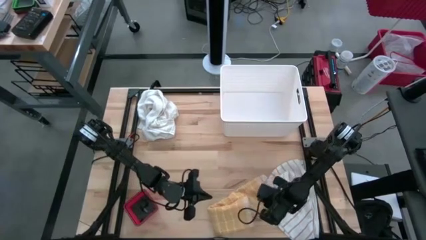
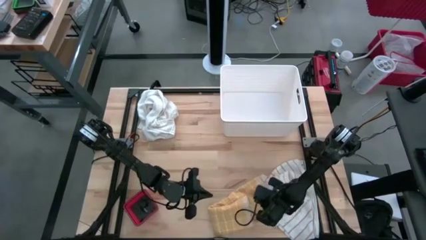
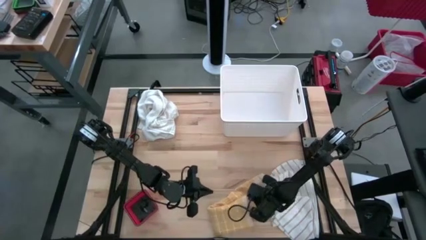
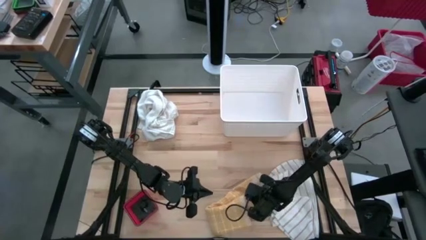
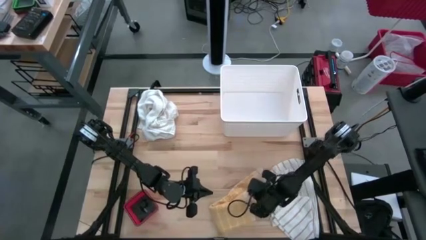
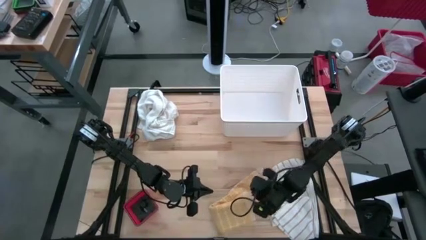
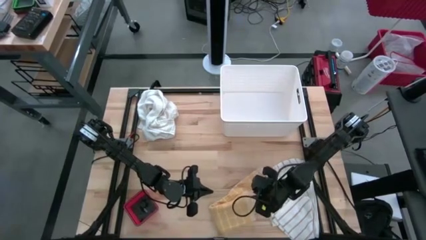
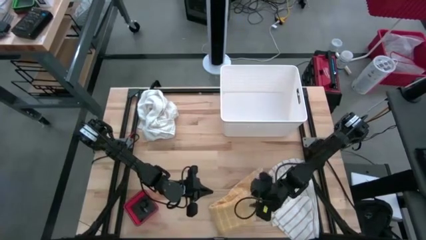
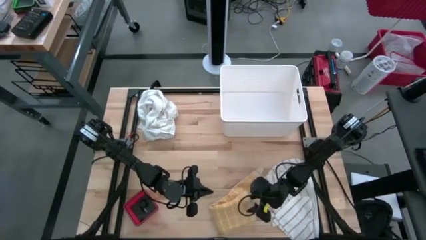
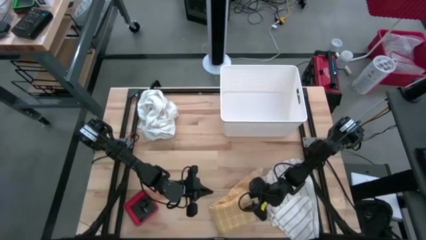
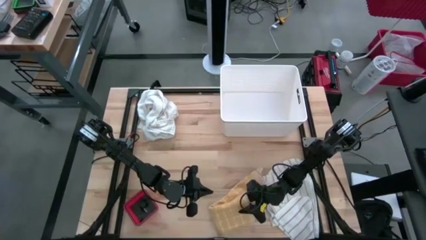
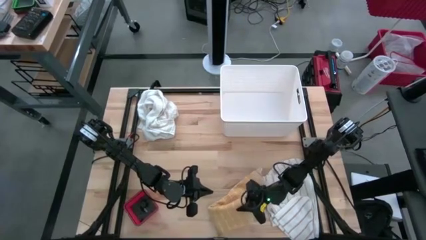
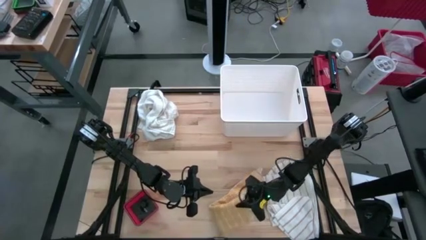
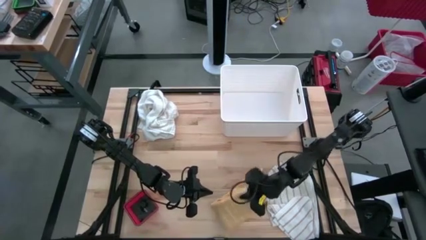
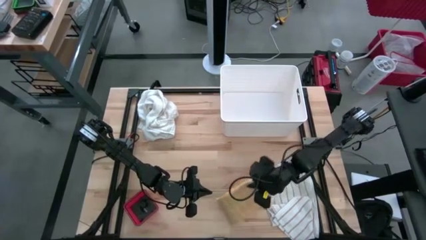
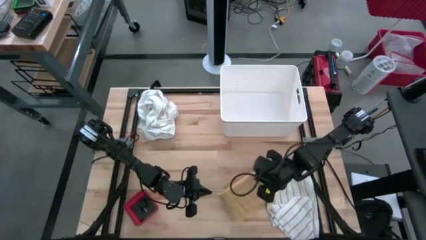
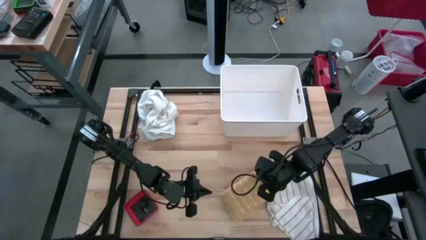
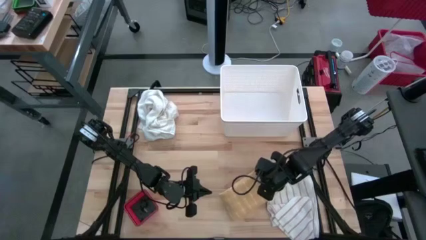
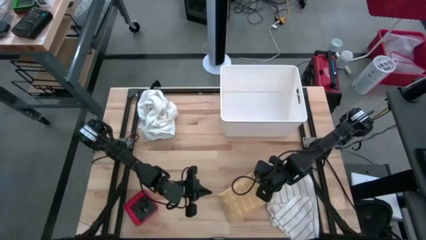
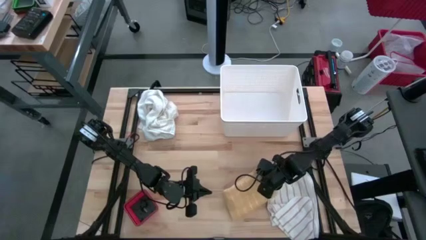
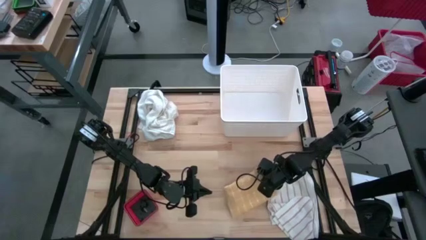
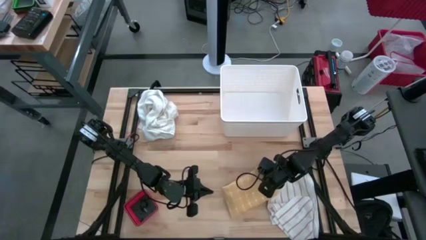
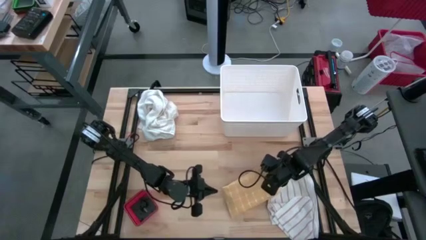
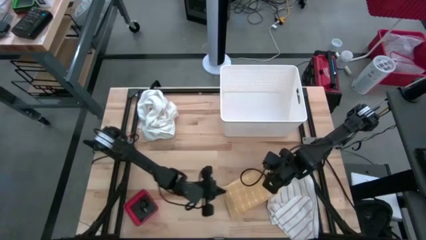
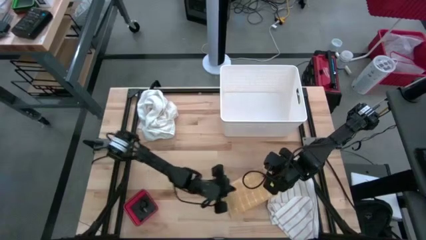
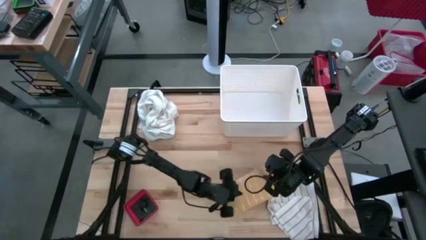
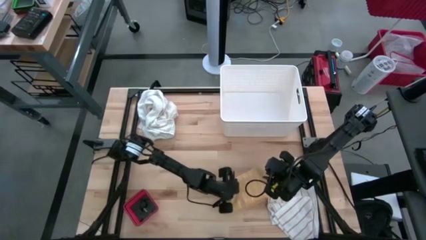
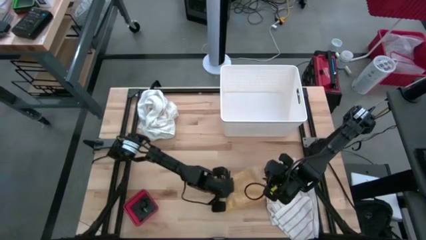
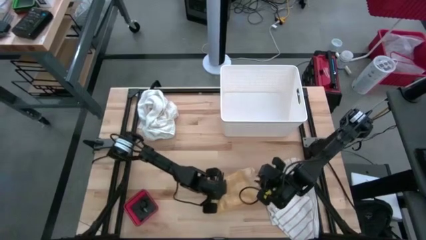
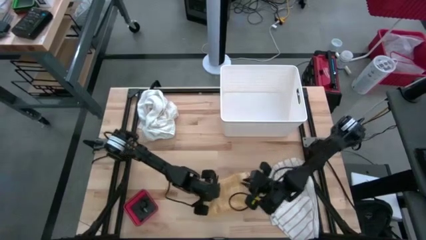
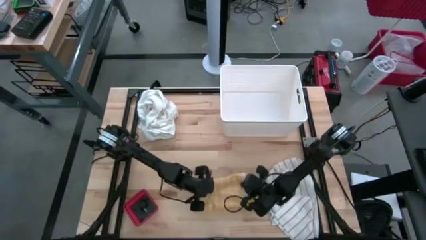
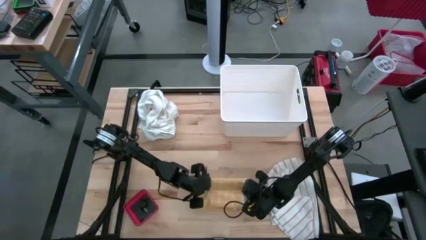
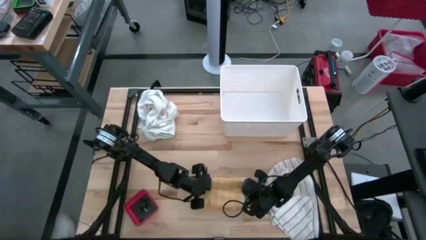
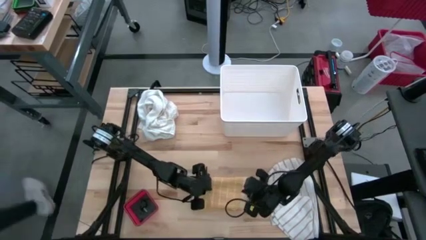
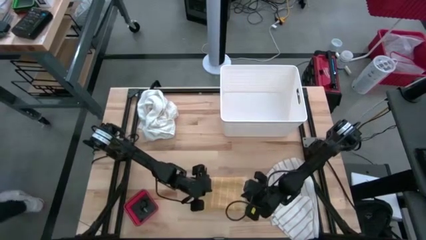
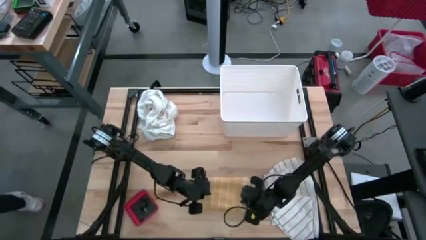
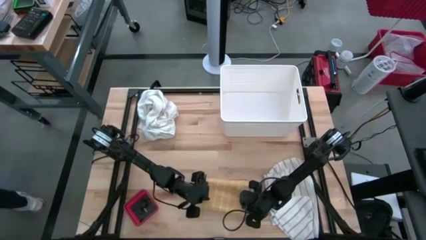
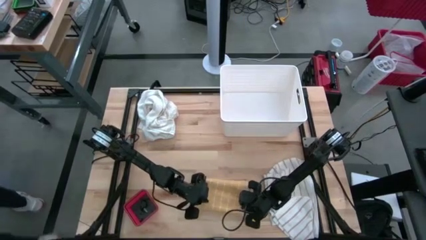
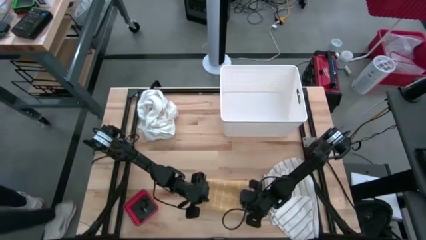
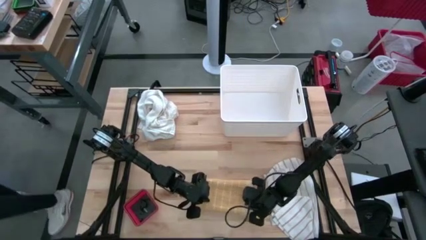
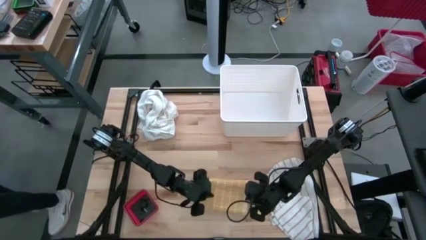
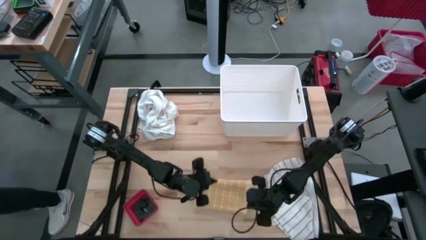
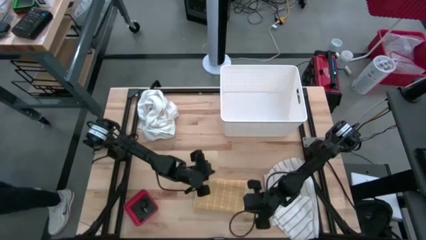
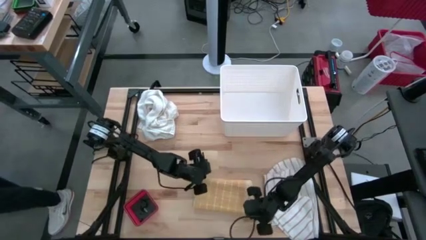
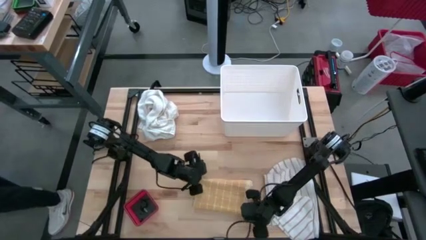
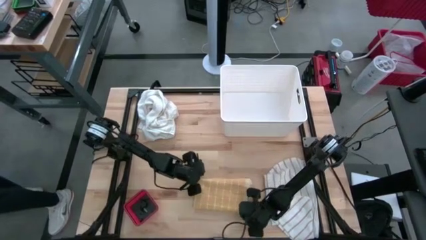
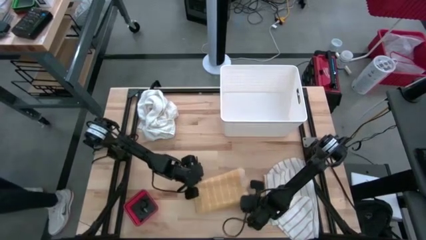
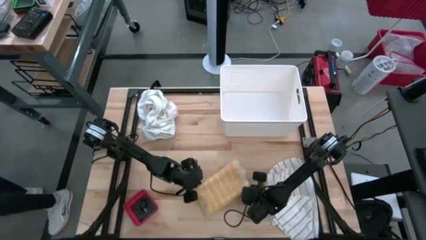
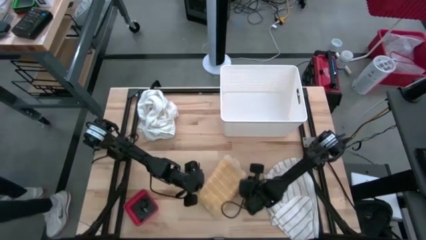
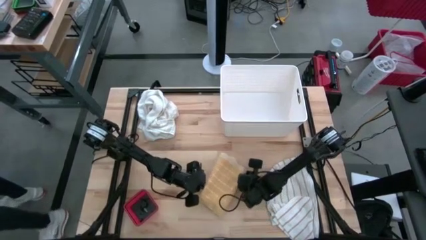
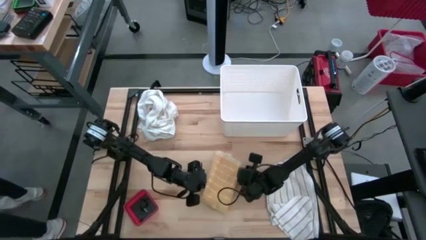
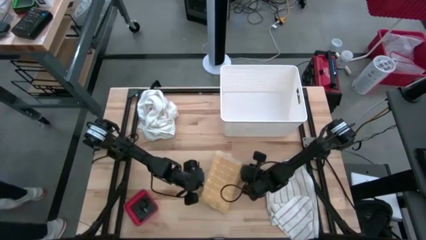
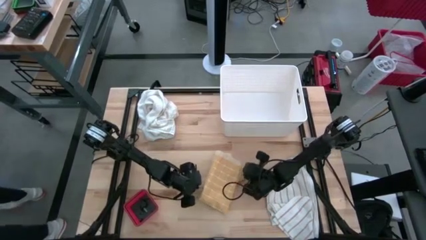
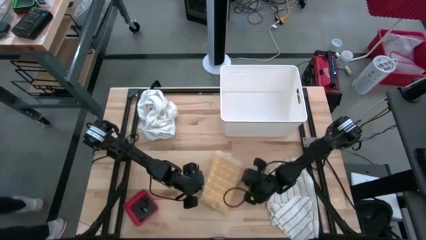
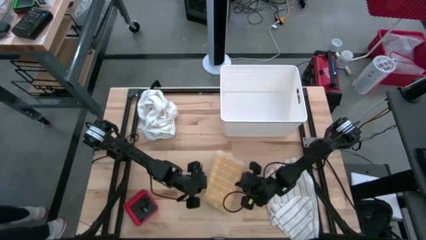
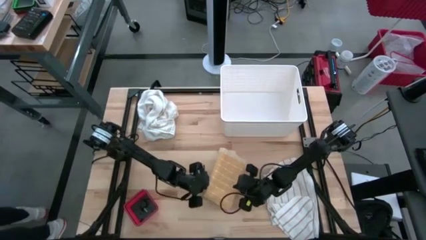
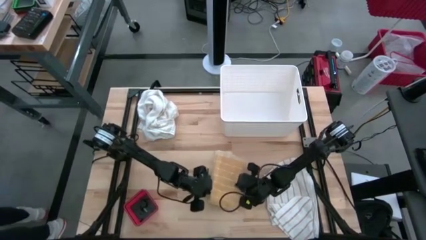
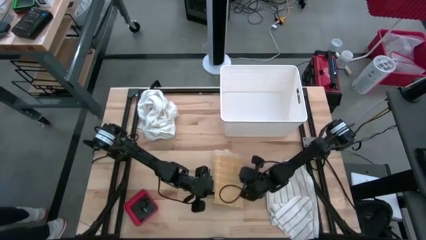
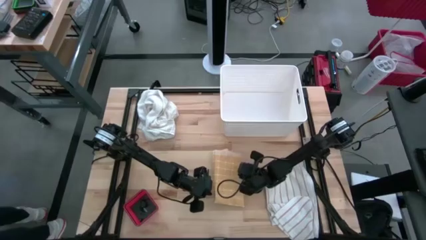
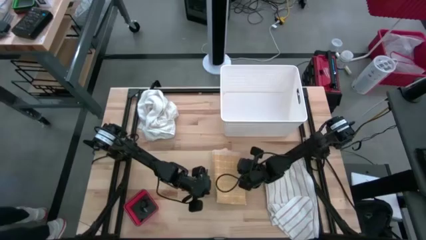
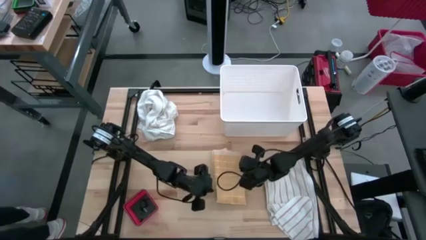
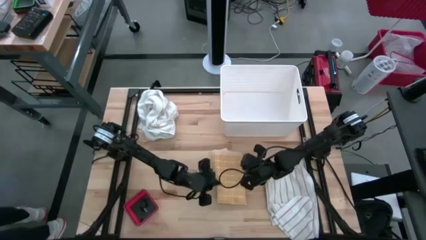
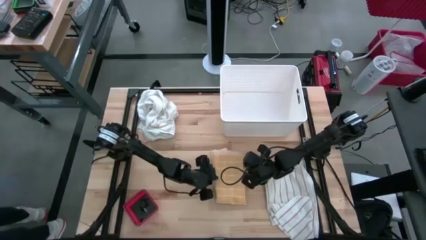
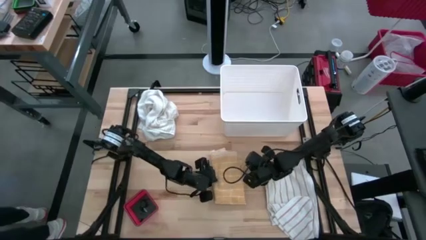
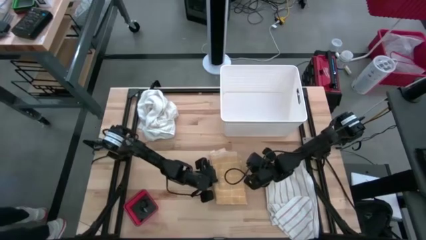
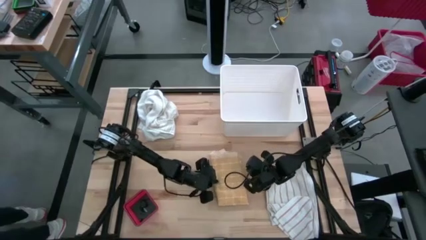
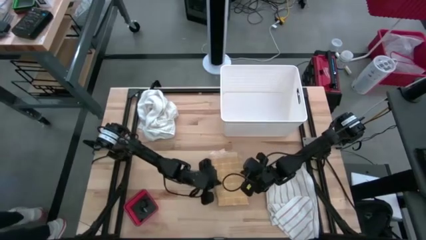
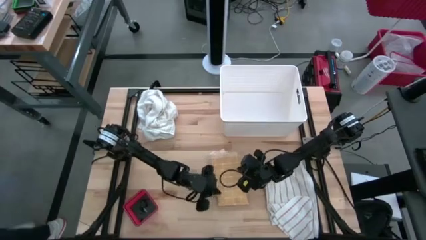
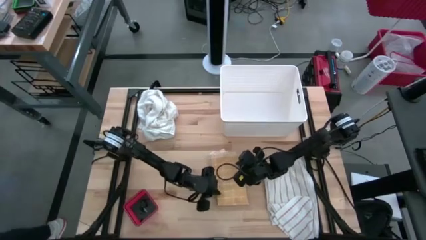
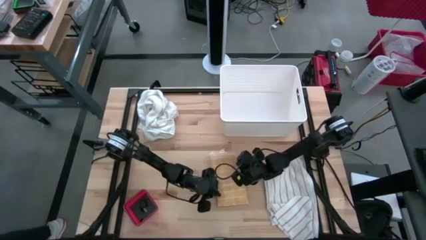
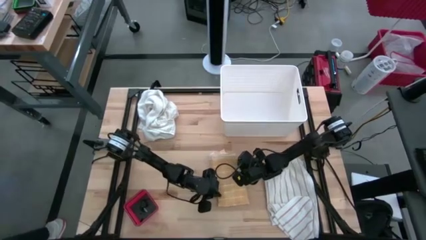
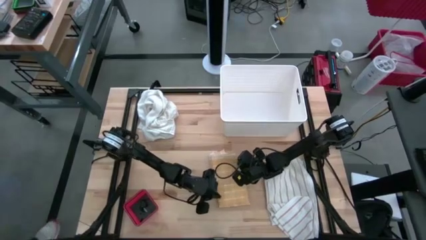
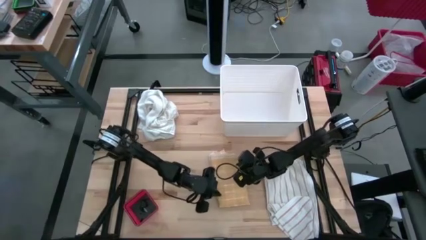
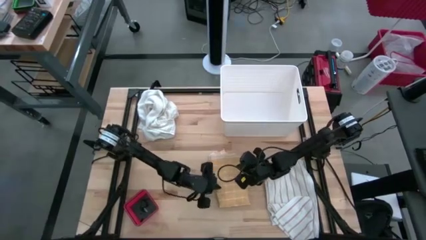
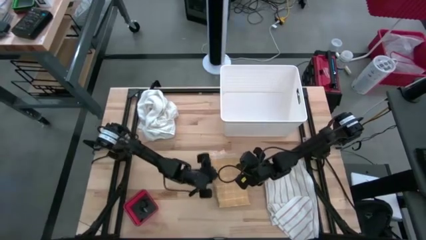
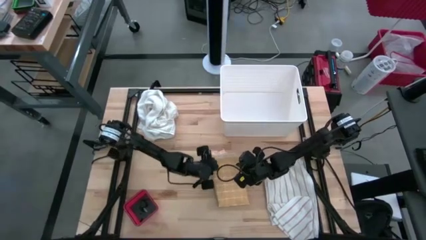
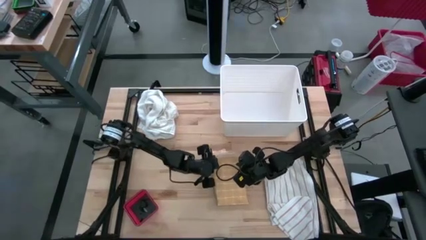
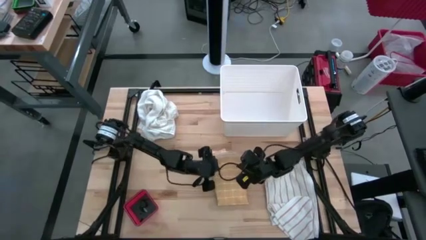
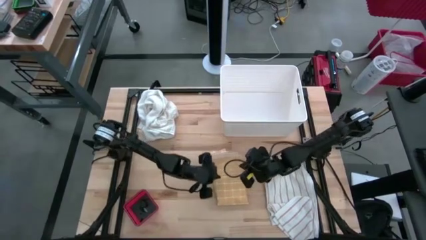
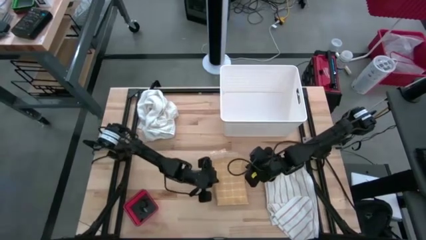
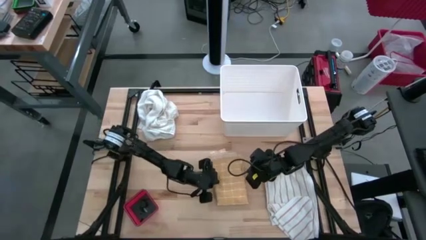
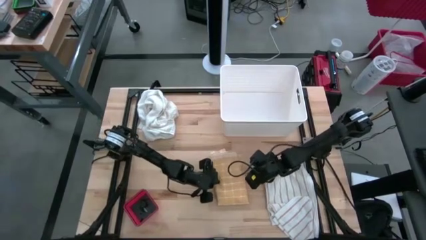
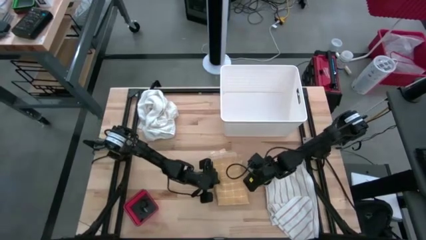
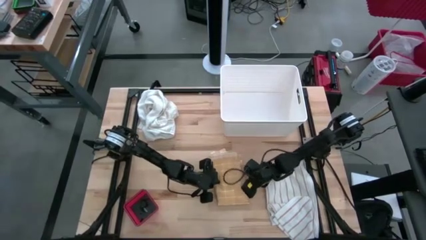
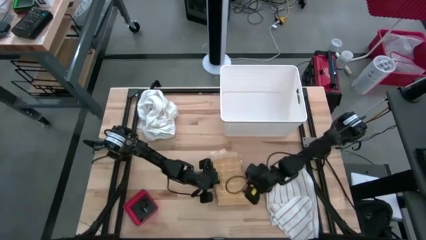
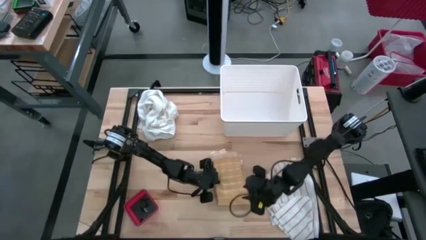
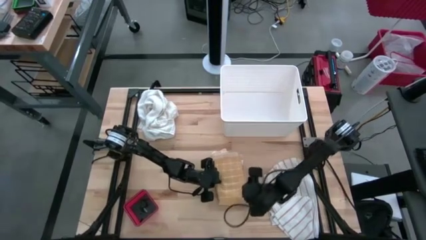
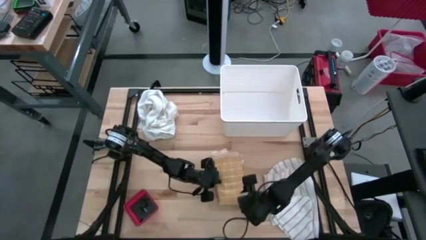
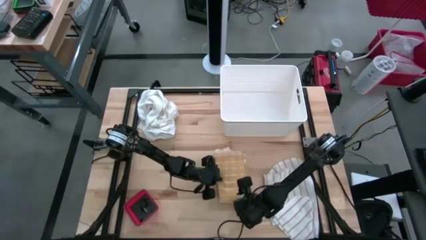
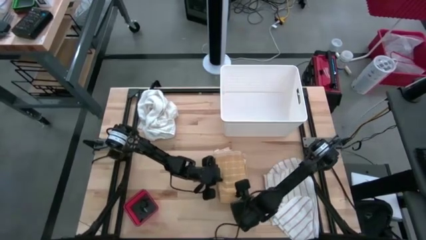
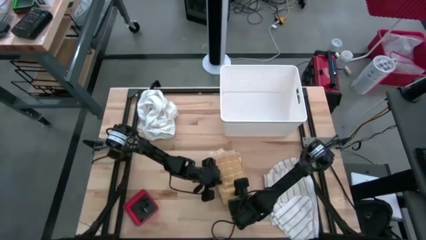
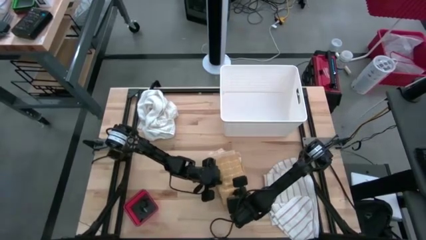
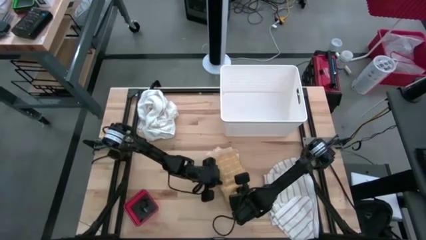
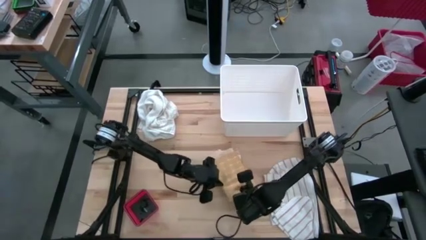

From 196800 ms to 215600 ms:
Task: Fold towel
Fold the yellow kitchen towel
